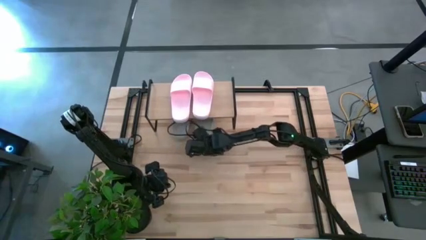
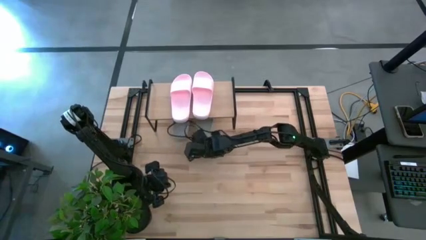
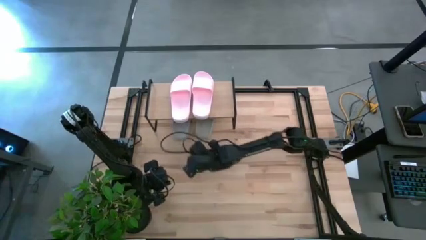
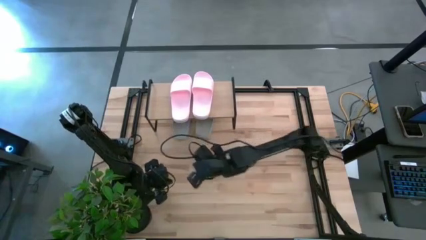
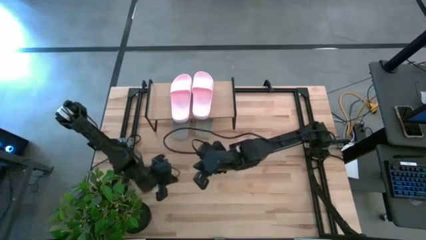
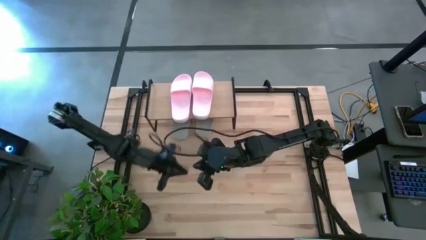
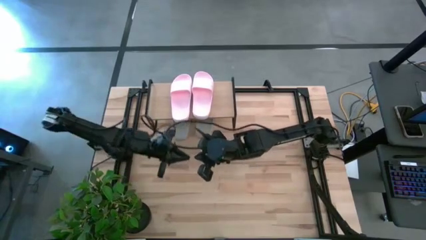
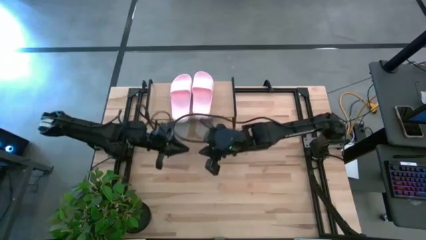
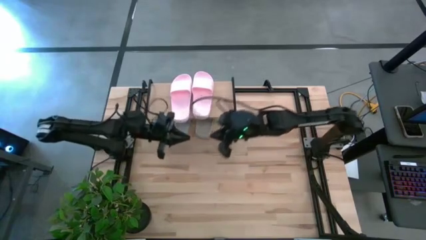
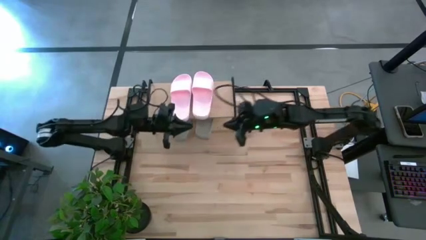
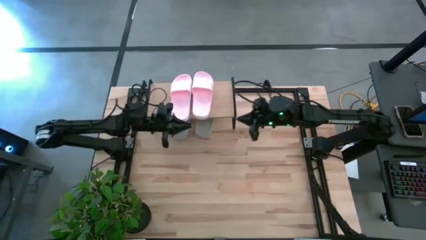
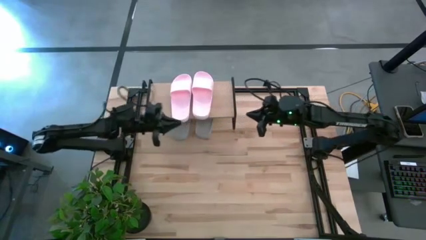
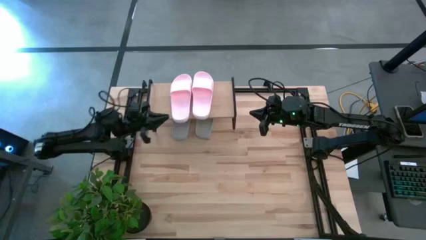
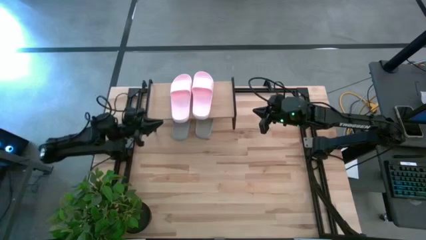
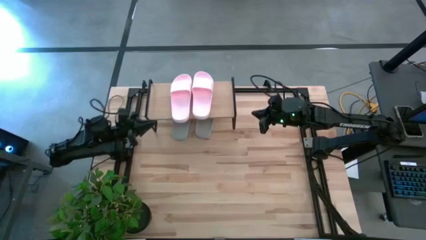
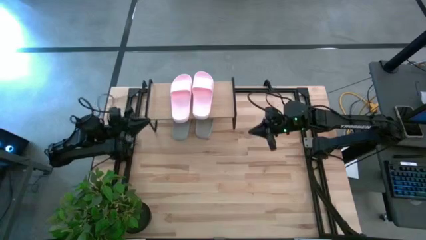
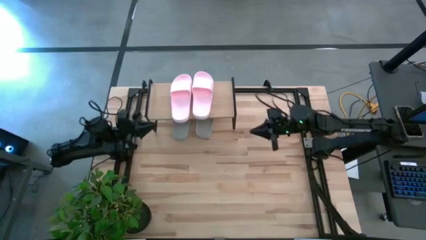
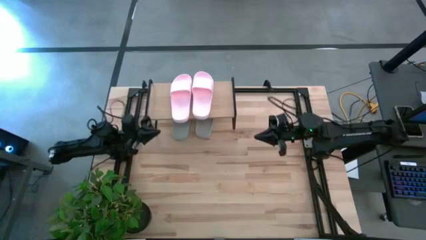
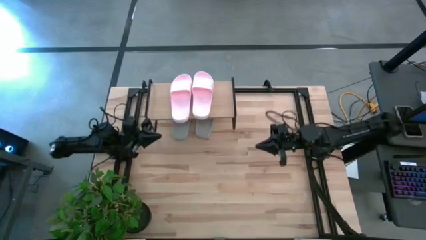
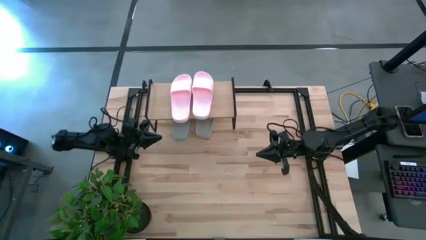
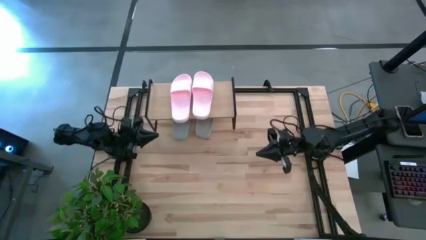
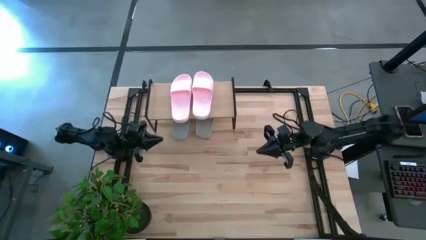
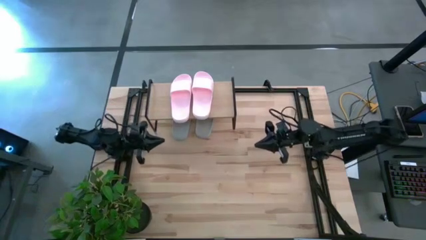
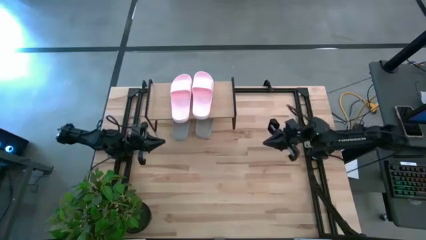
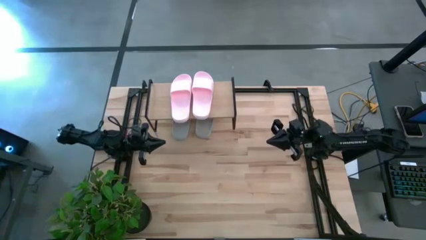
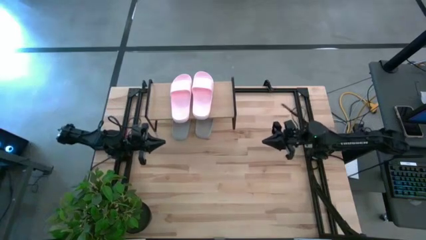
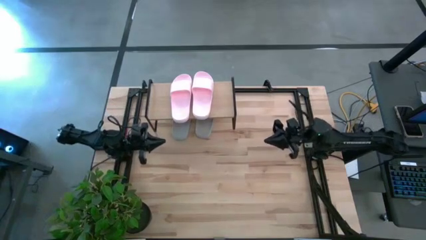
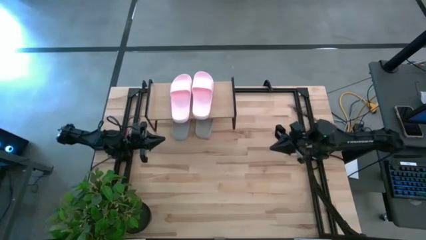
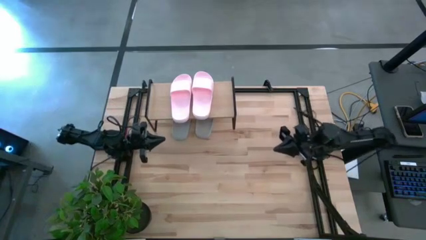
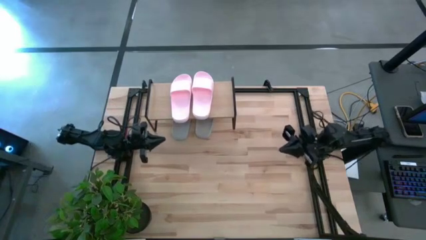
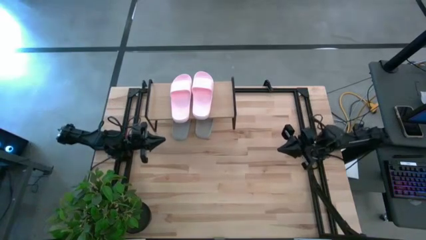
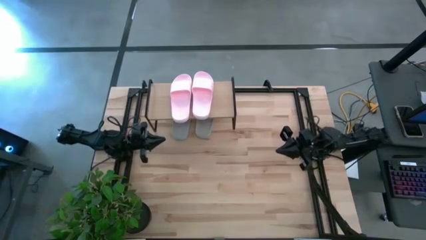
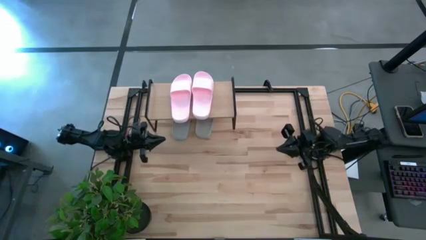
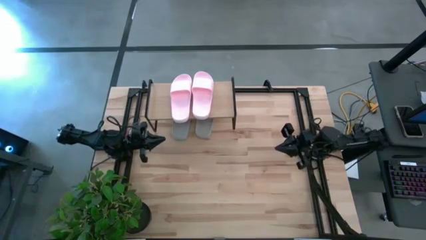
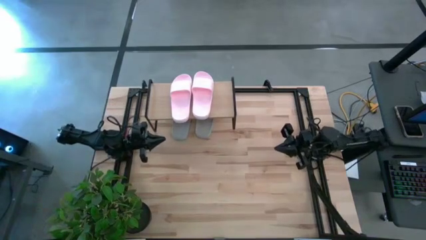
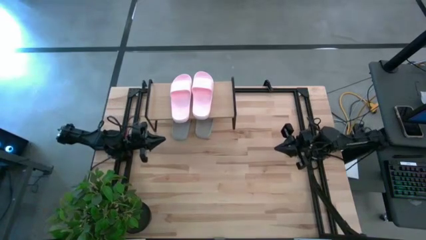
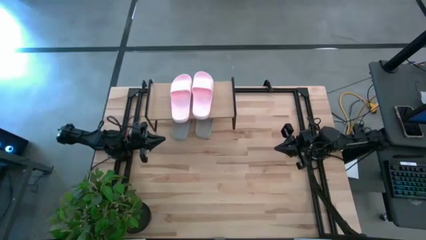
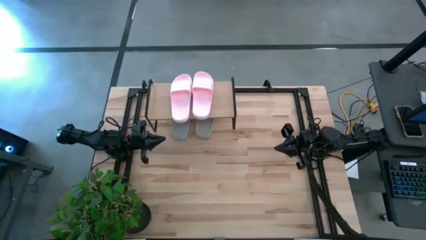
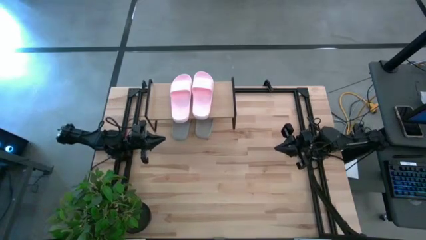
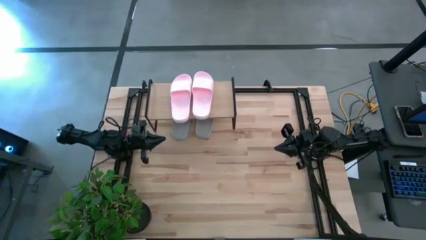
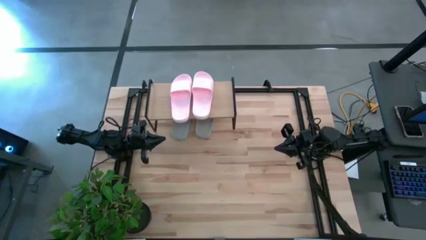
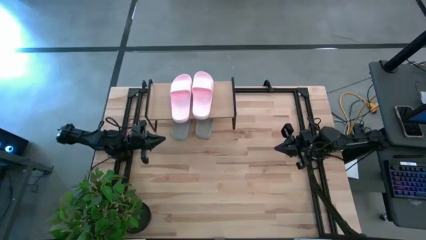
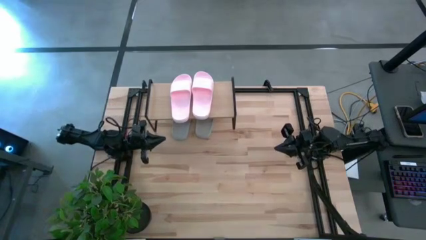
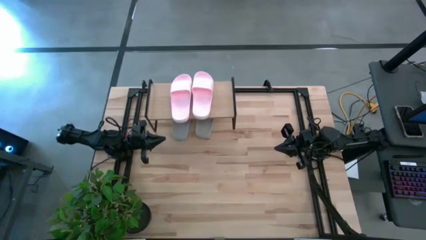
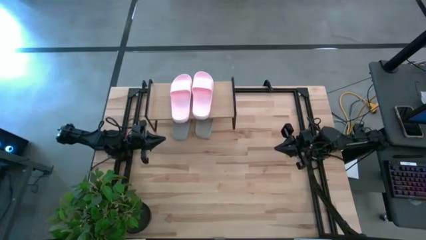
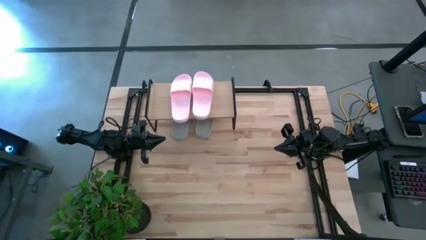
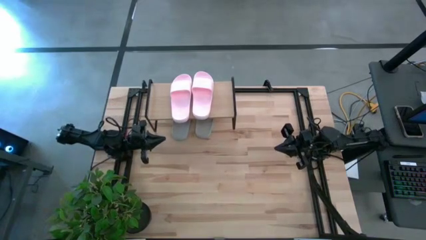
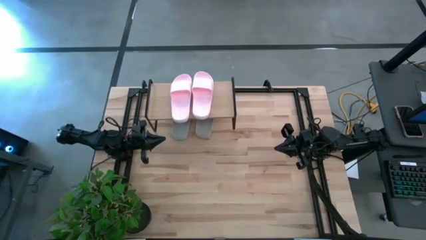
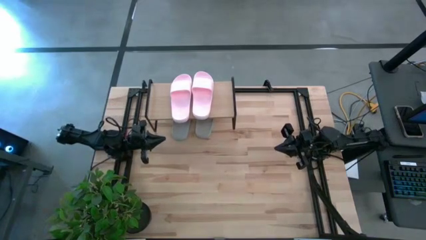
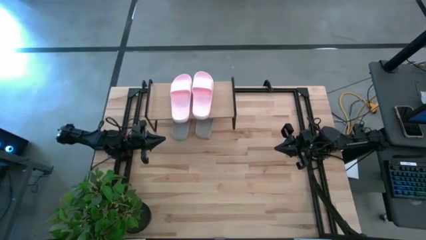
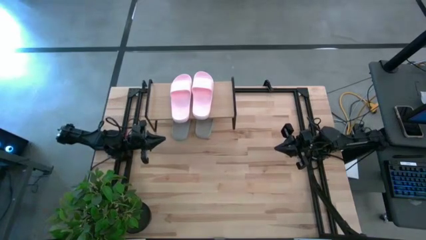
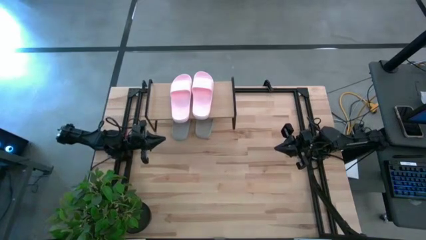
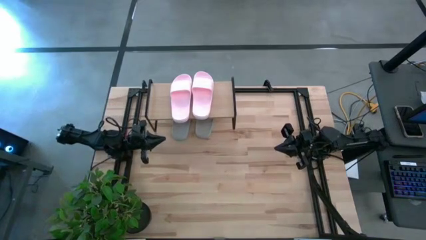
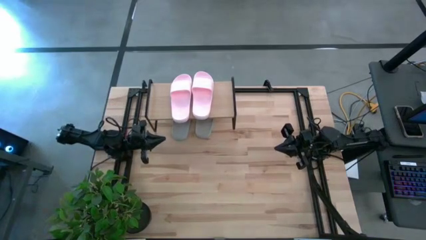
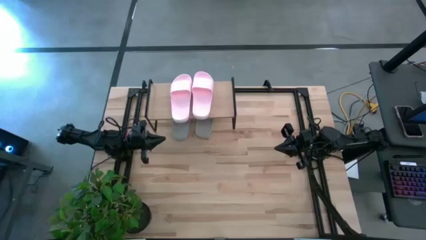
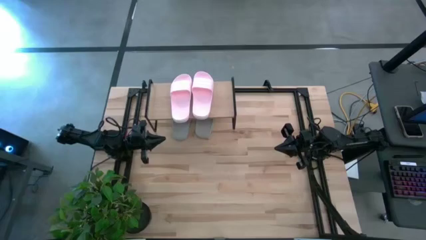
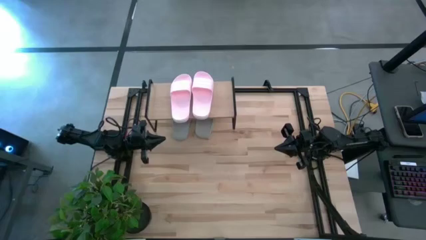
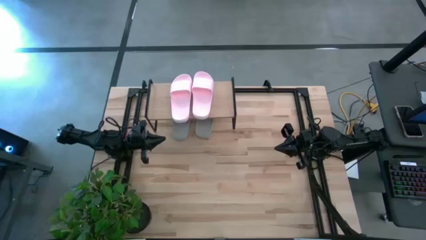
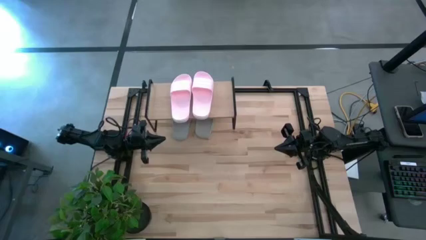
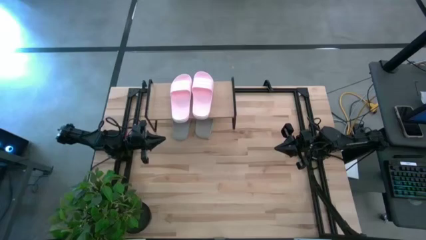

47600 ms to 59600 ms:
Task: Pick and place slides into the shelf
Return to Home Position
